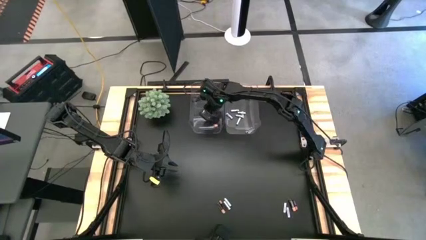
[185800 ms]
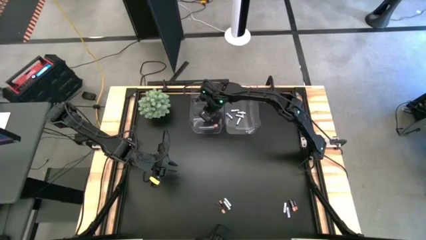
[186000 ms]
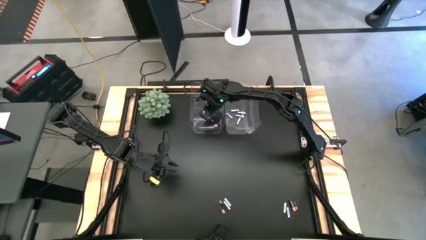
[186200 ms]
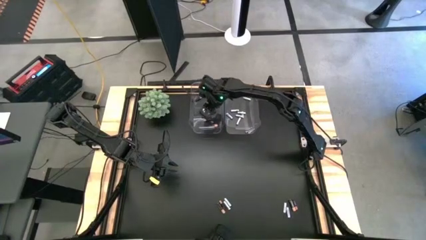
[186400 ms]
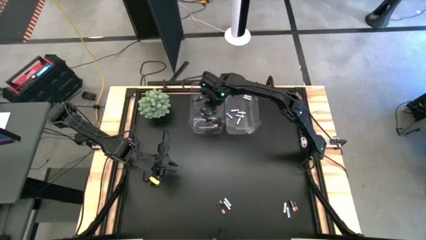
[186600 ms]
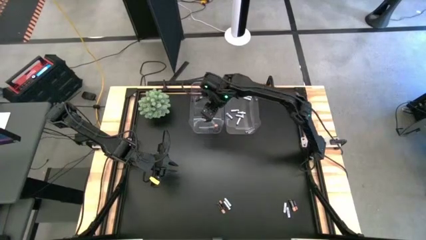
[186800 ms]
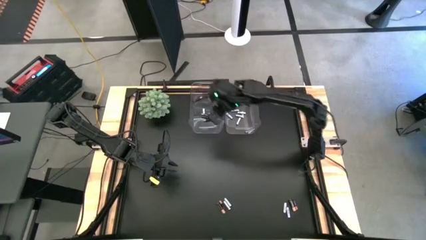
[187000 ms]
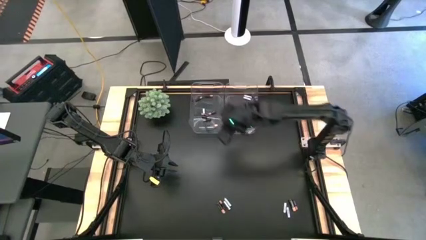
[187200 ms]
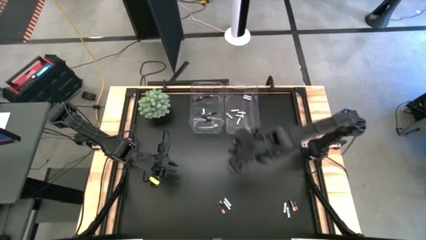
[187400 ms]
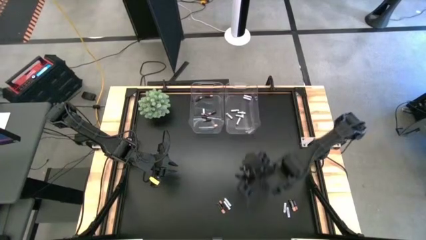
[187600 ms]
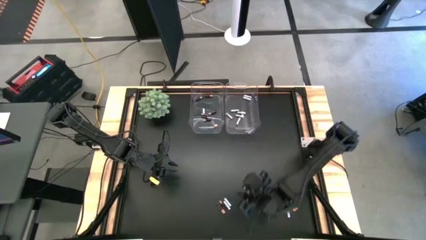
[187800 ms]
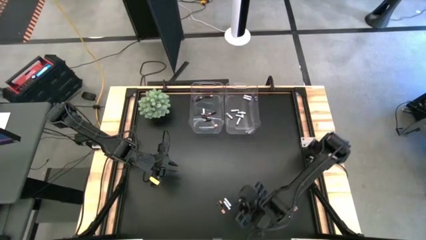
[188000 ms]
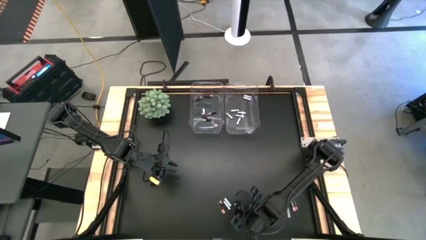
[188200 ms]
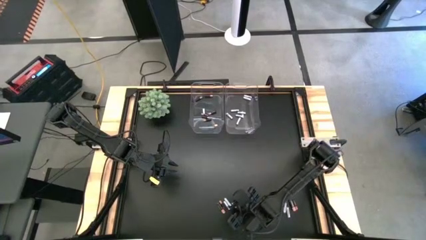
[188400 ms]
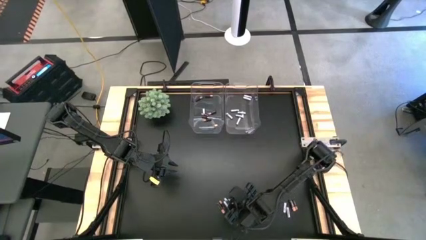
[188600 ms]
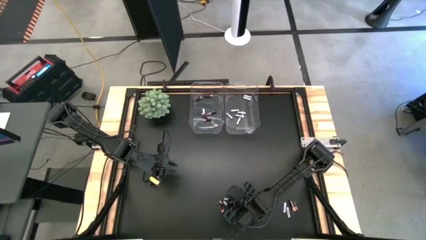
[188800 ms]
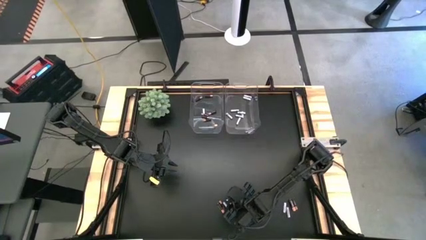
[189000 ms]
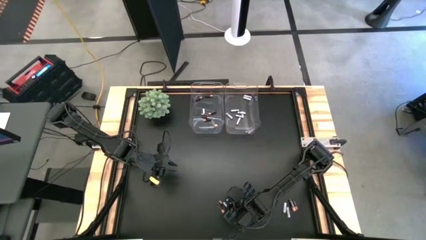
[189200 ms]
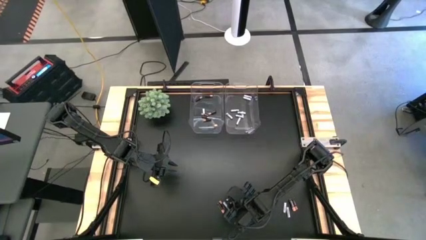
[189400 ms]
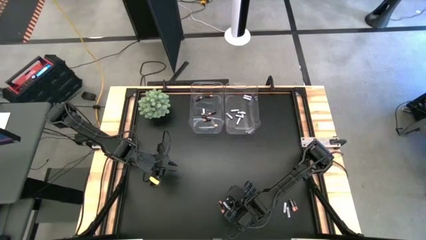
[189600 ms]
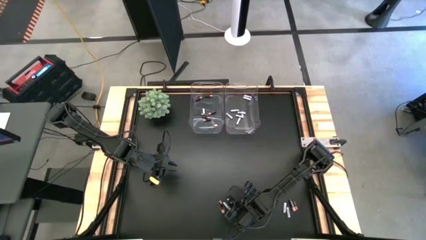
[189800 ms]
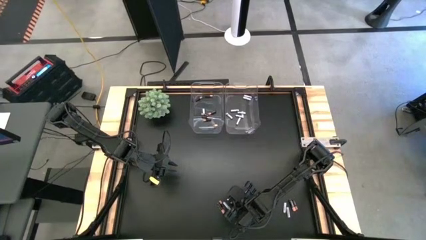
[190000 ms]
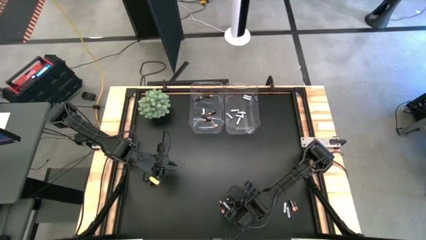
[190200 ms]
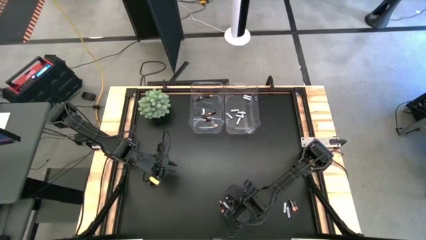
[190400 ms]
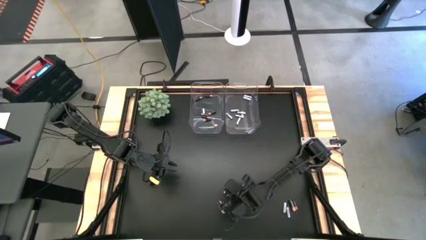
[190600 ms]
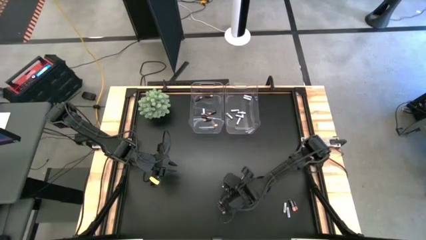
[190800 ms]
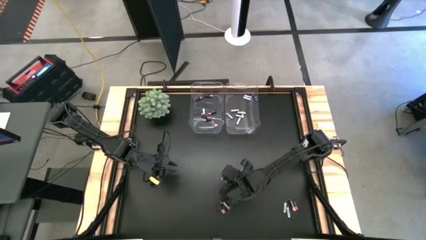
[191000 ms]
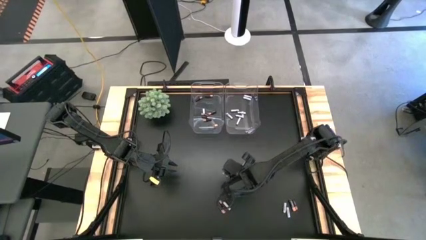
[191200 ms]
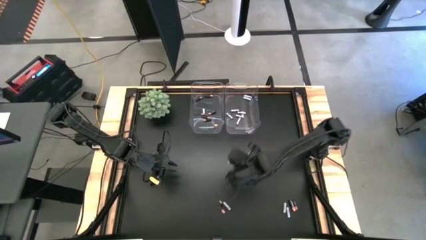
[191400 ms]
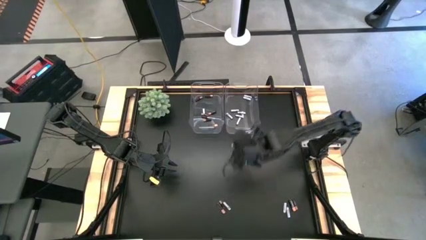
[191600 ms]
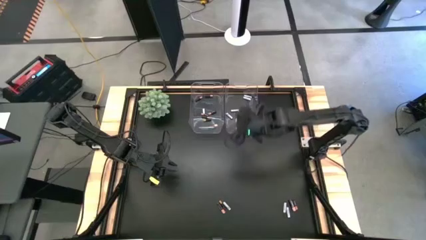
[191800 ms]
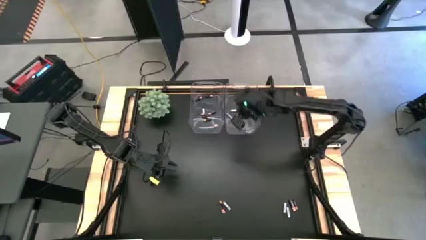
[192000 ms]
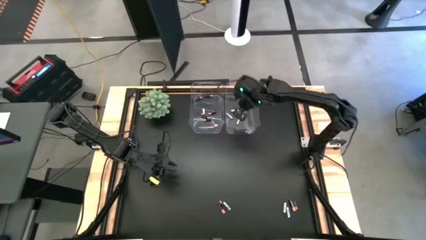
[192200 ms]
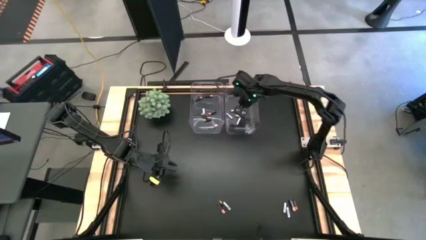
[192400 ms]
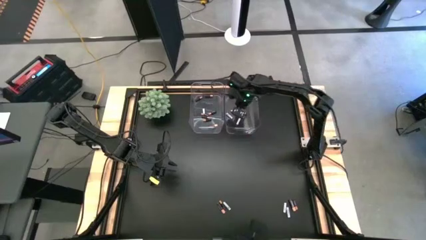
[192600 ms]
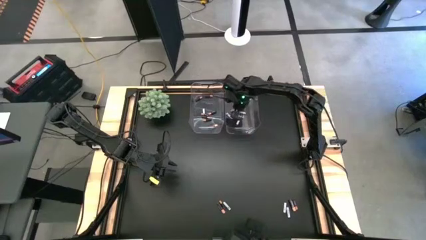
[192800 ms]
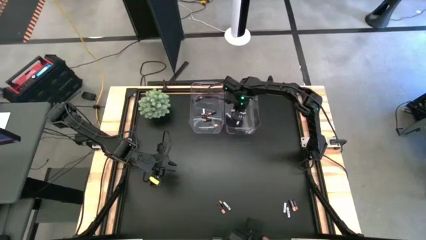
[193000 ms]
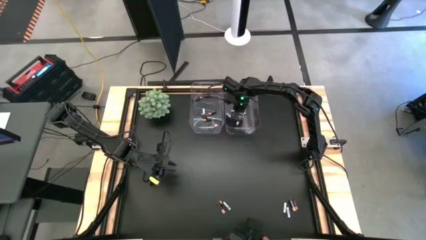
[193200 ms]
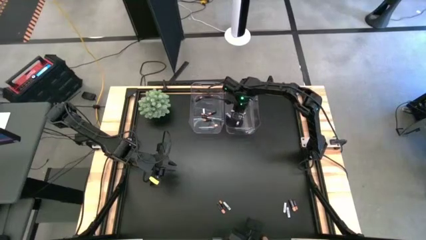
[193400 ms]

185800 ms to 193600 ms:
Task: Sort batteries
Put the white battery into the right transparent bin

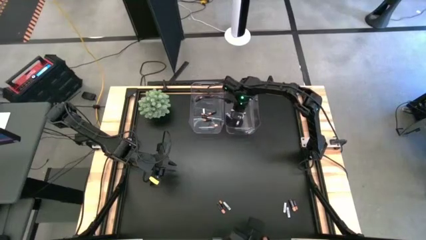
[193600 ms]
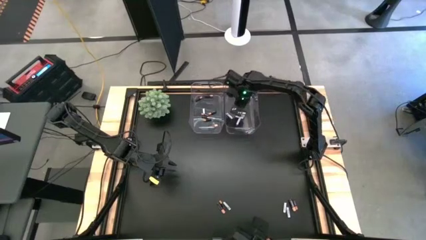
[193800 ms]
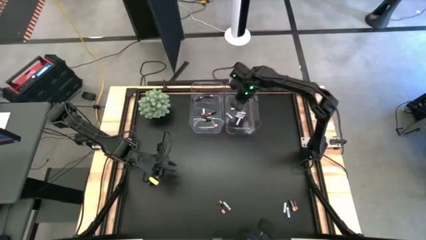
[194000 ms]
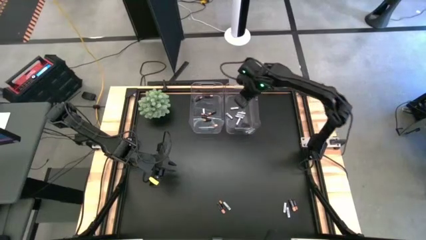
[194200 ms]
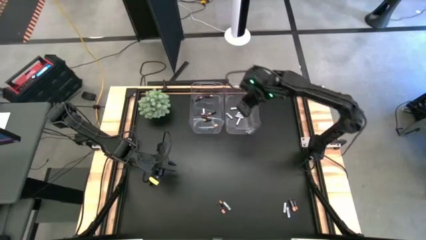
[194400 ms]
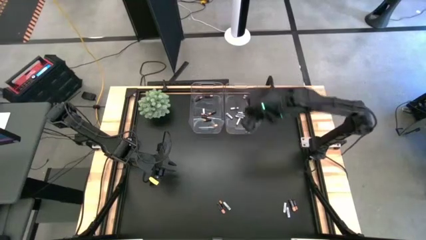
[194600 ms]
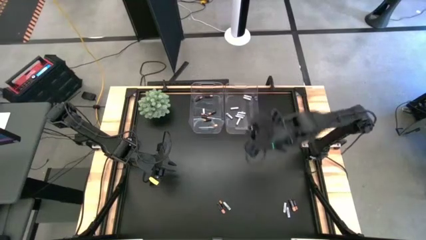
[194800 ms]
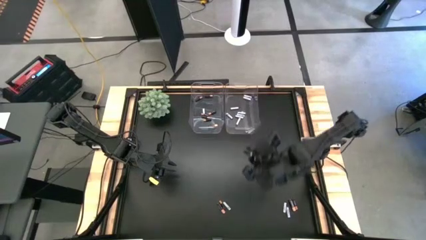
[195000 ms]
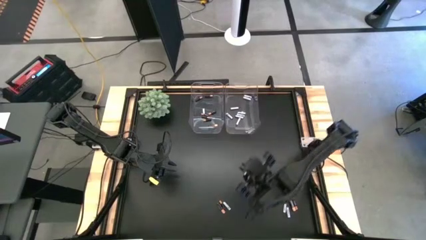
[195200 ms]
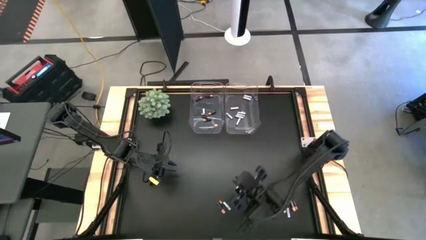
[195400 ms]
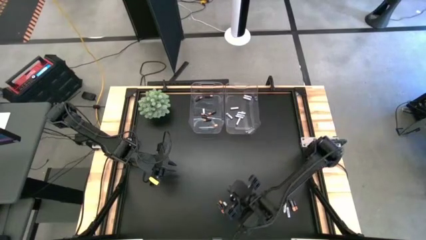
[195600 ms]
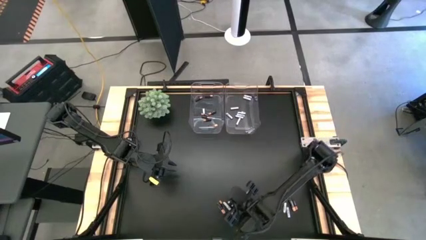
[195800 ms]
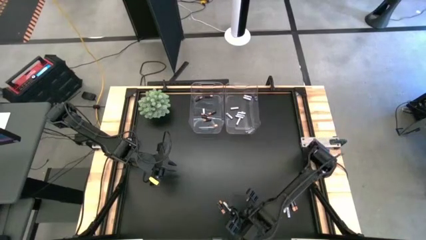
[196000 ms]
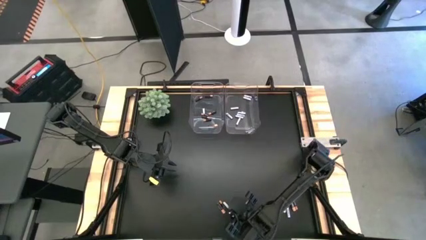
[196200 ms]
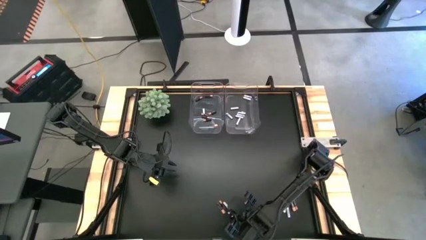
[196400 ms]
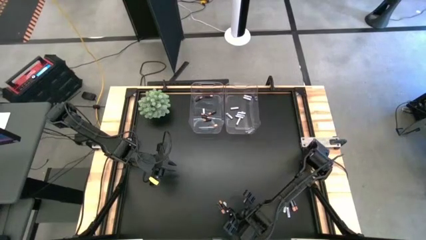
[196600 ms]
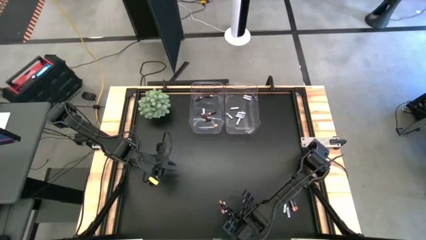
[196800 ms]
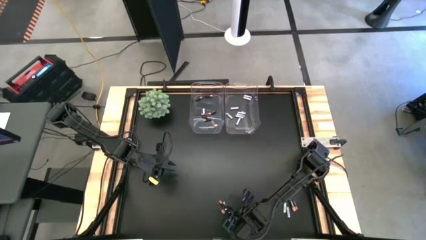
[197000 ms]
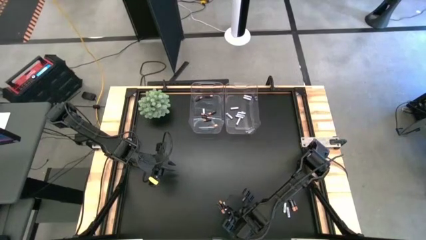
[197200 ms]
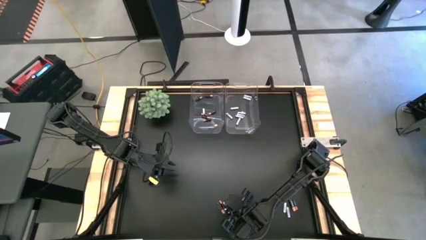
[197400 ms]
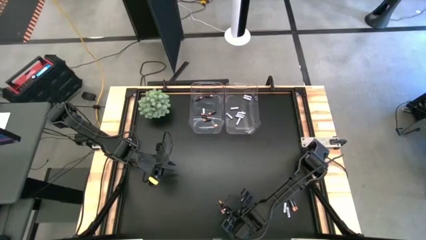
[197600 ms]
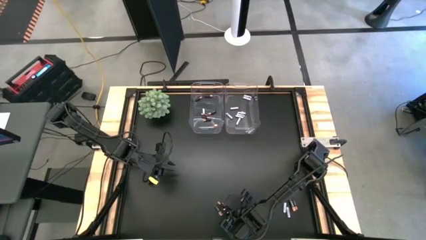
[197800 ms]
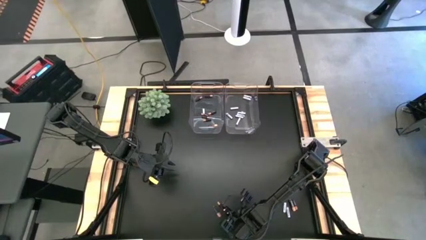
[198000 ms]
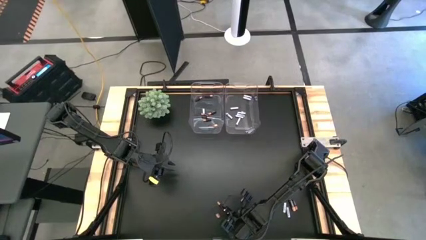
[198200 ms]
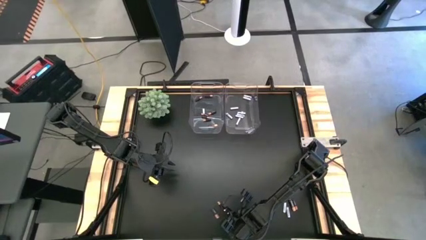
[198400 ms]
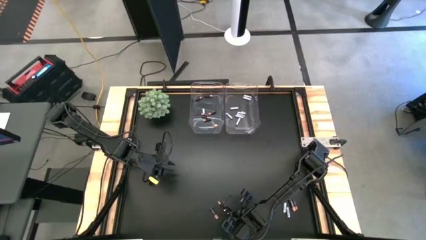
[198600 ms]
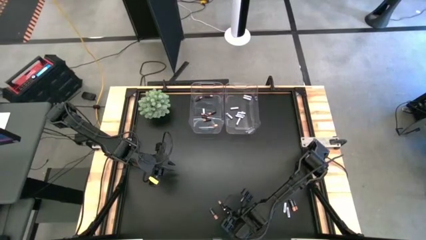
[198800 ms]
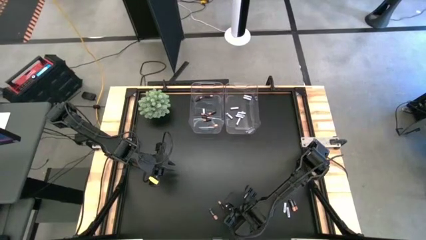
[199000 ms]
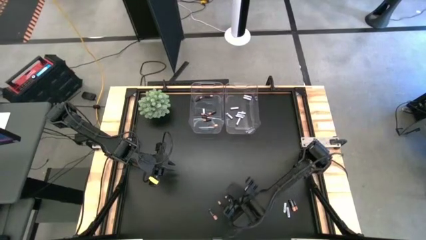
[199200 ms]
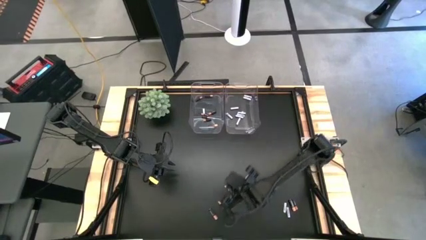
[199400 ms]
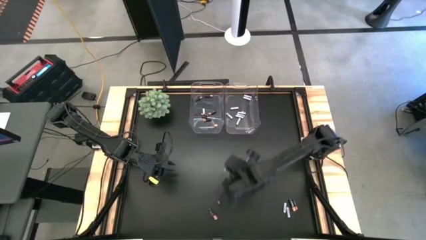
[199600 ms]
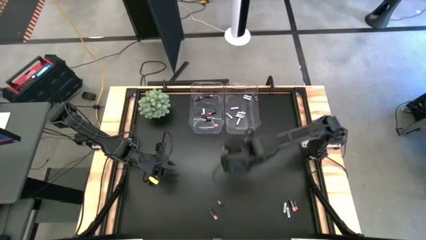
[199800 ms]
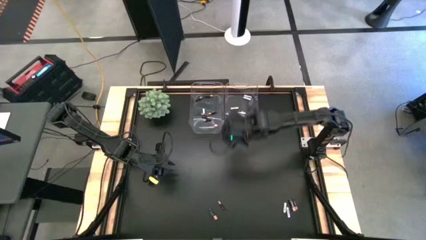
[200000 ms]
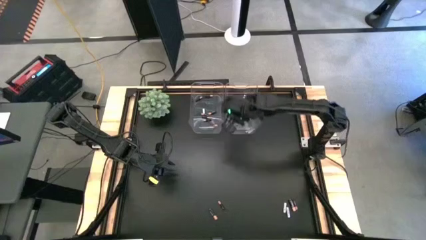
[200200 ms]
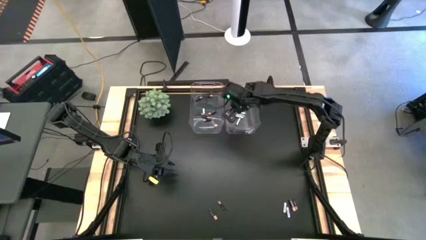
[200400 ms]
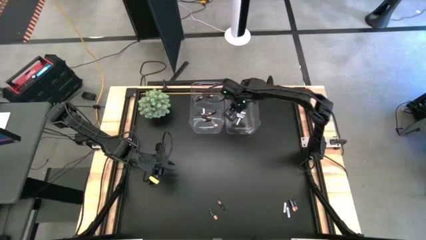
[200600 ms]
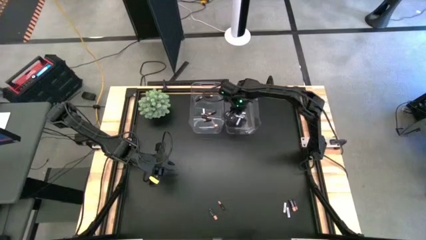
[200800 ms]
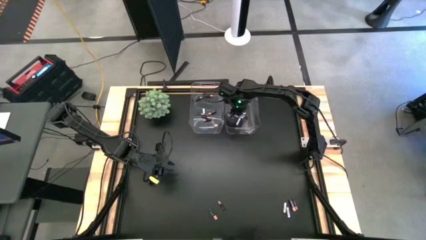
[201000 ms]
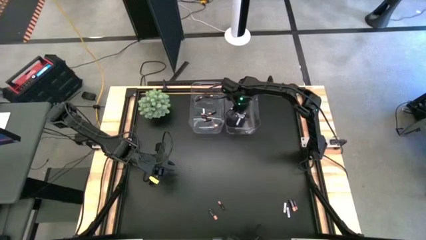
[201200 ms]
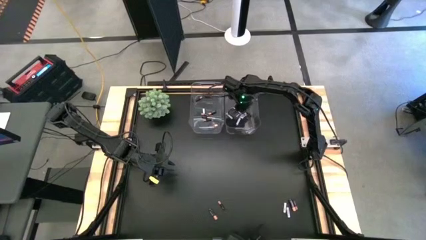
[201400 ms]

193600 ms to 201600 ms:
Put the white battery into the right transparent bin

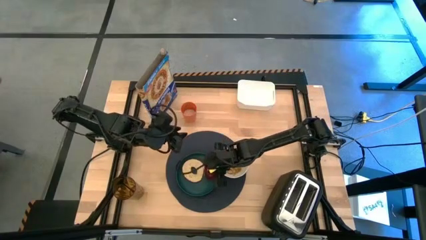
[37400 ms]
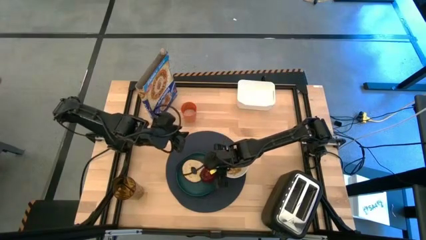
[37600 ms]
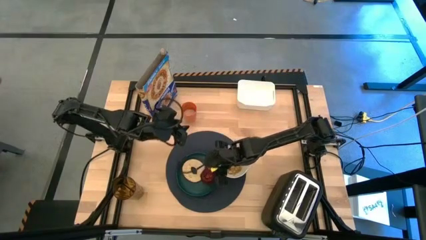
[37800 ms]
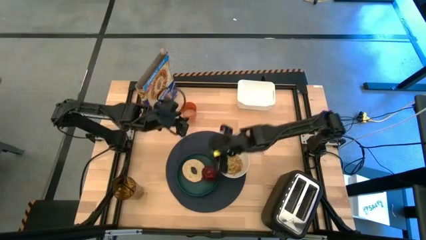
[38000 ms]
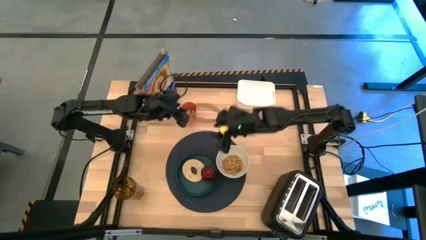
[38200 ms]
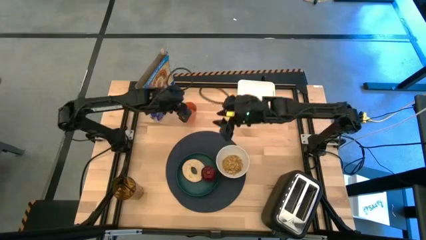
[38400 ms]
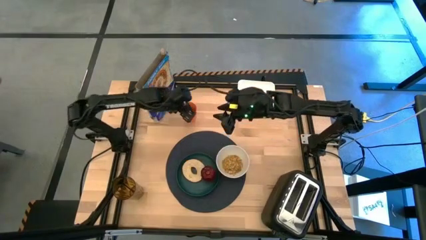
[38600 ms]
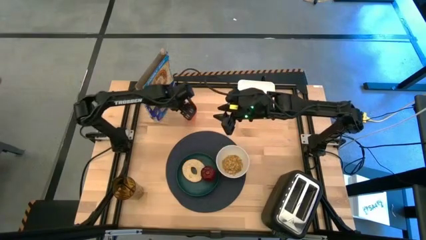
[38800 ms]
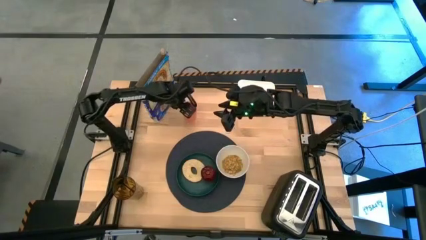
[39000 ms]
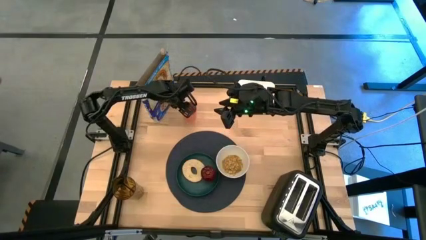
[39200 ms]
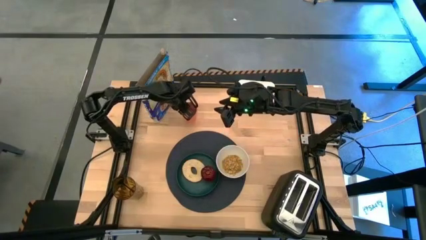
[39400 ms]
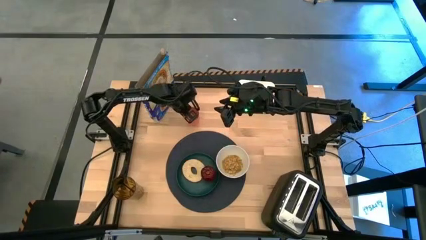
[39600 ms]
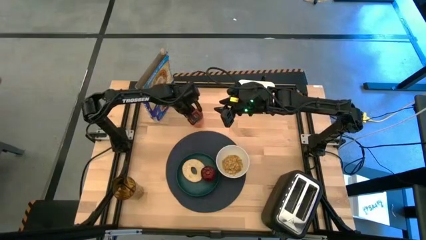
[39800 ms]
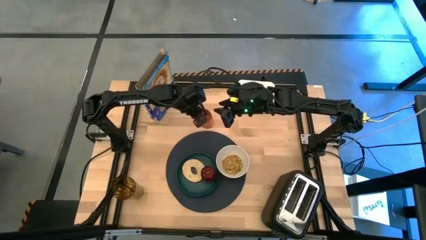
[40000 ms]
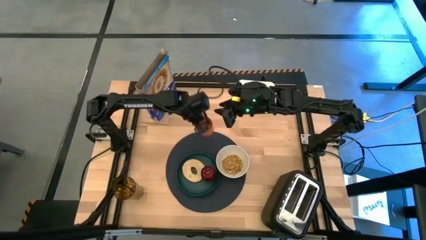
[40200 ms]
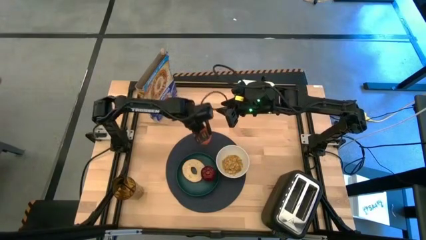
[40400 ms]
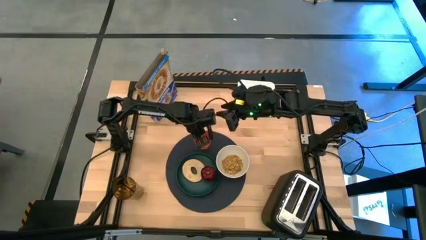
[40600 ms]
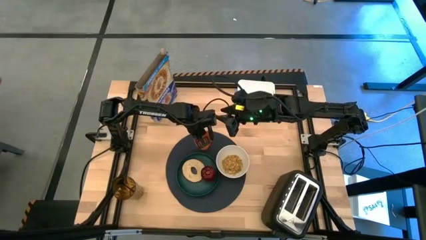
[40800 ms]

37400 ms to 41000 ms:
Task: Arrange a breakfast setting
Put the orange cup onto the placemat at the top of the plate
